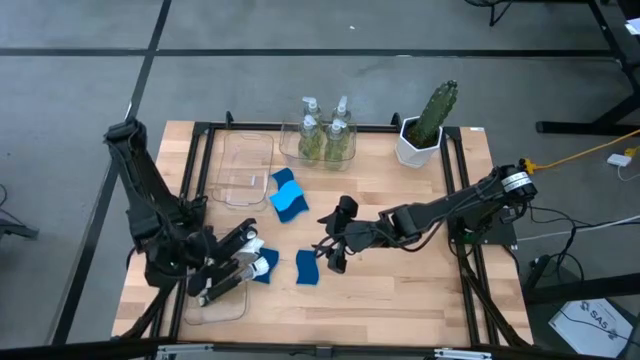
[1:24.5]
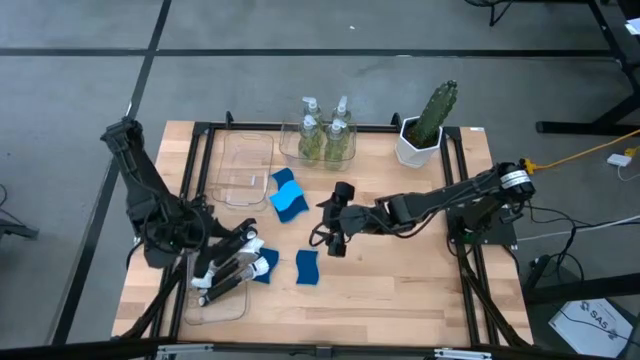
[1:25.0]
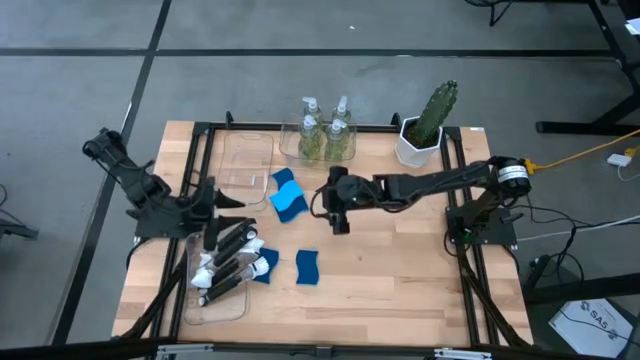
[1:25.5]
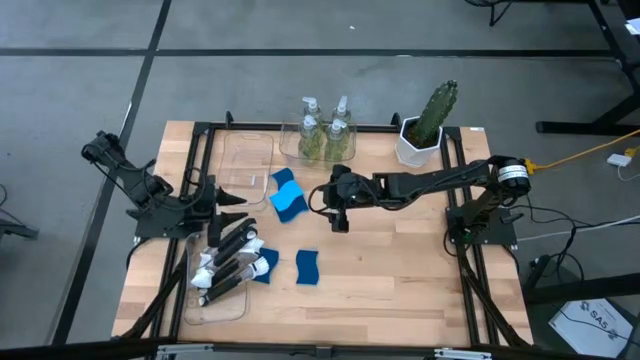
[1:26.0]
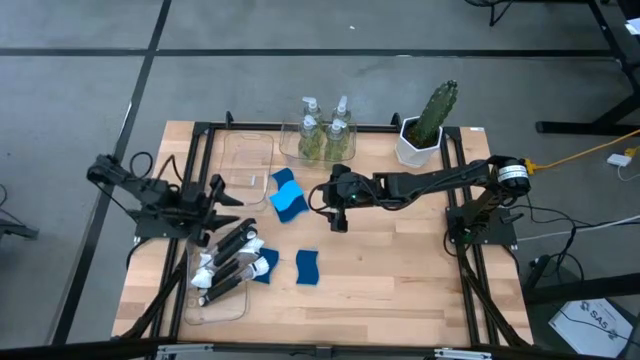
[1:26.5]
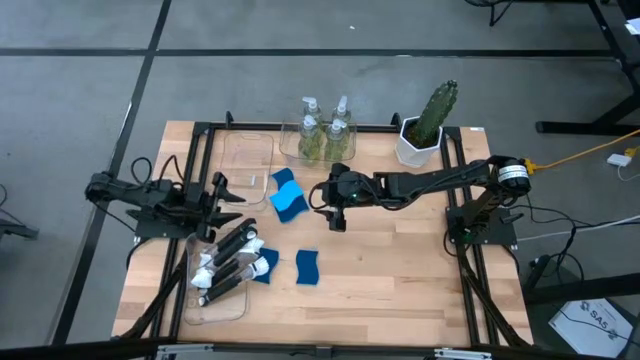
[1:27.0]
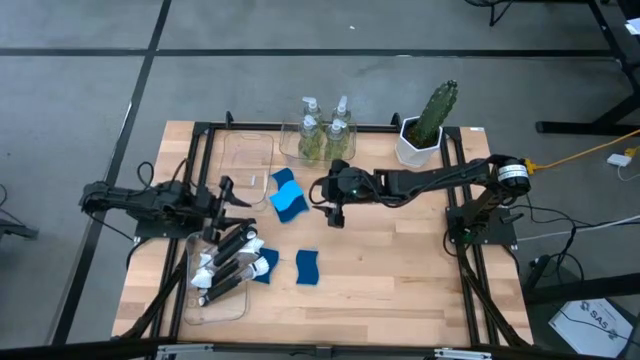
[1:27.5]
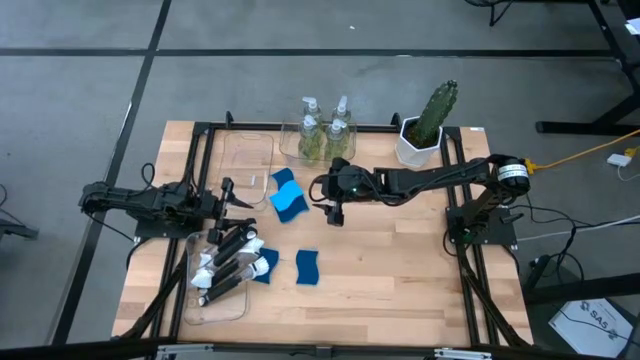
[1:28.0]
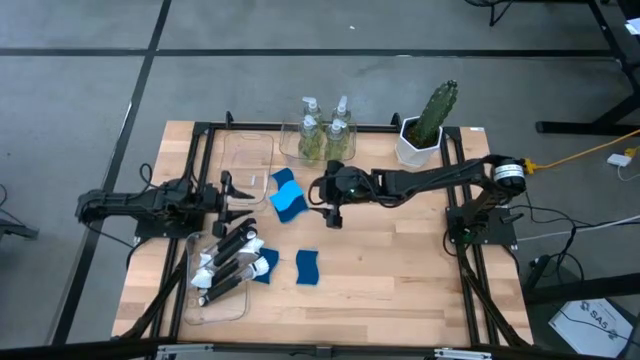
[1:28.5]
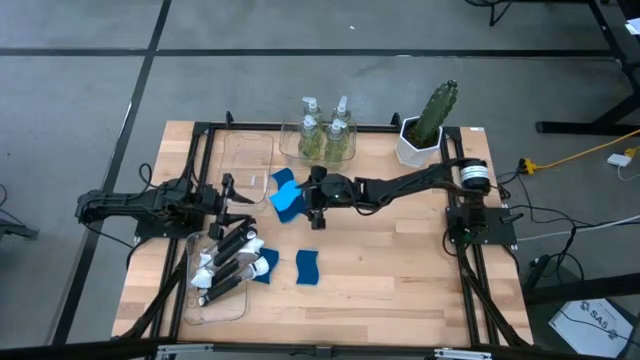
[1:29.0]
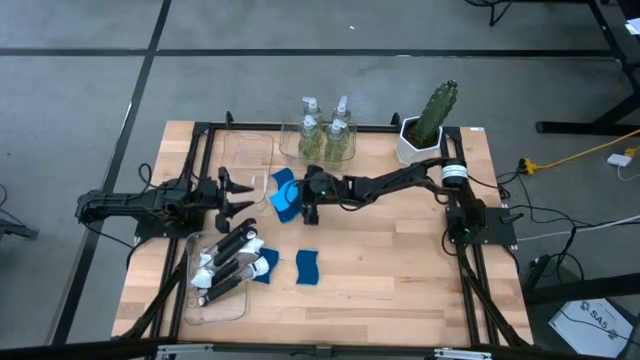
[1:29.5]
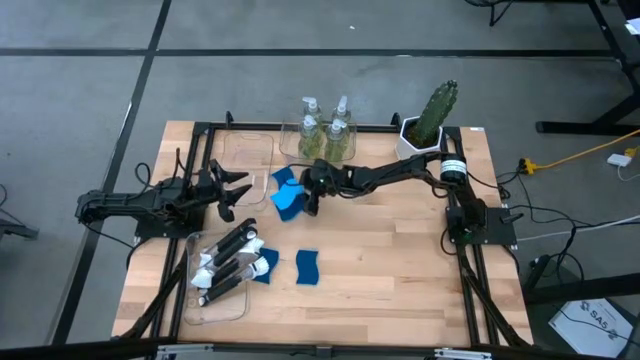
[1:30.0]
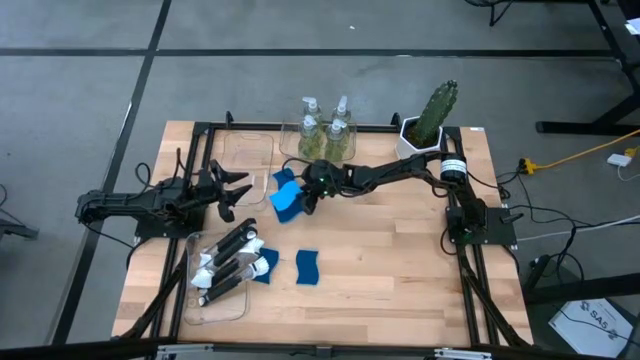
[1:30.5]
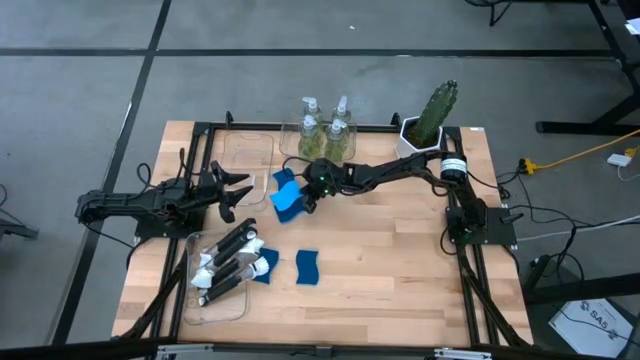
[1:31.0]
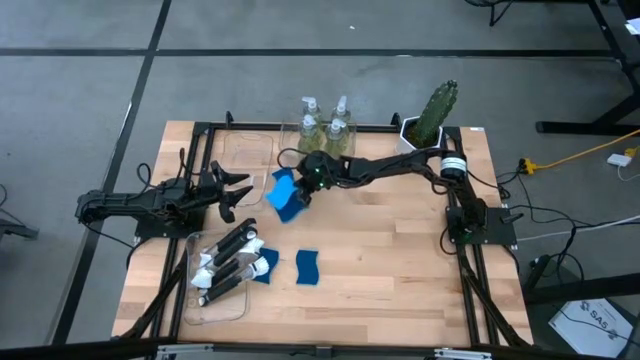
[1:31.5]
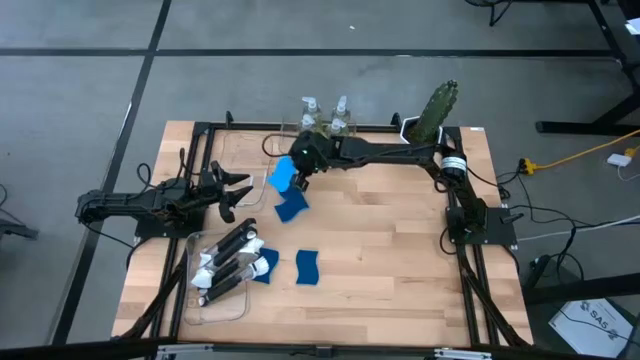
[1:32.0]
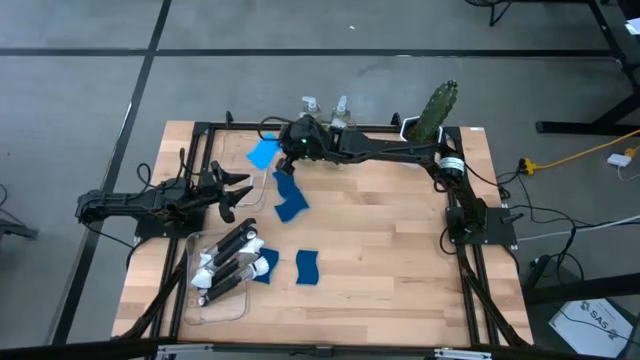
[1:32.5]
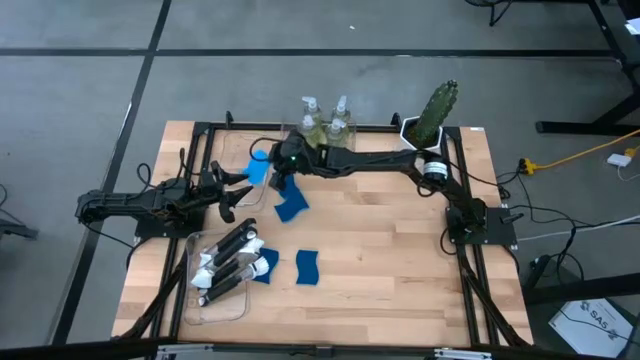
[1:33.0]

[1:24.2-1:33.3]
Task: Pick & Place Kitchen Sink Supplies
Put the blue sponge into the top left transparent bin

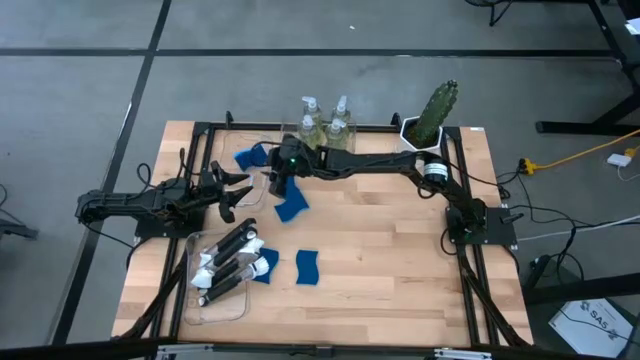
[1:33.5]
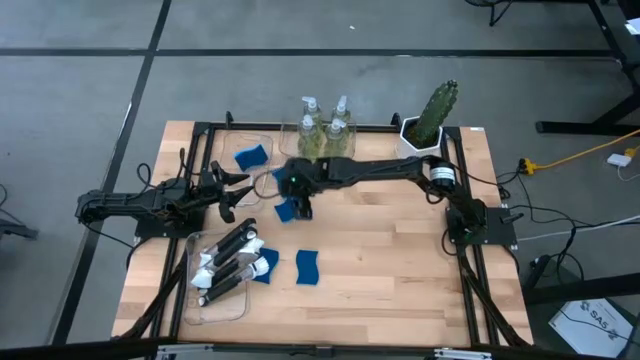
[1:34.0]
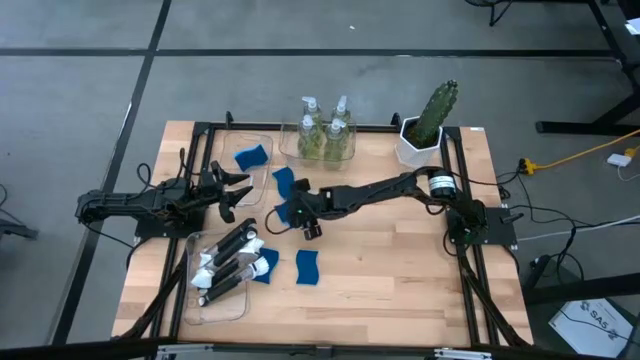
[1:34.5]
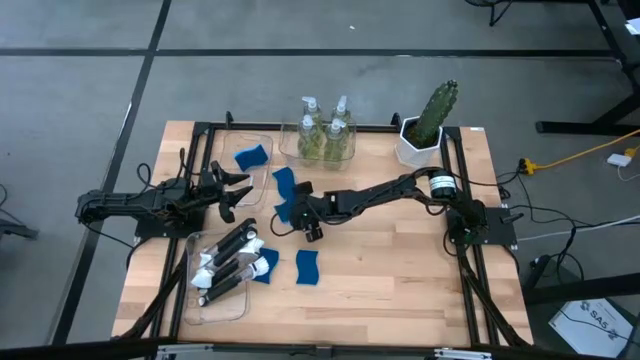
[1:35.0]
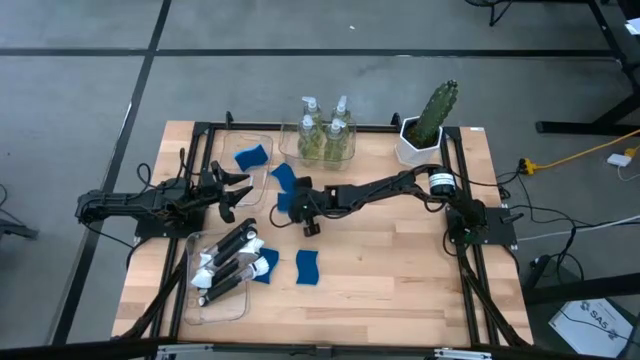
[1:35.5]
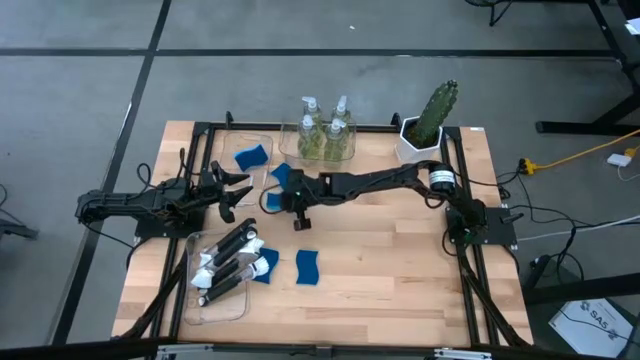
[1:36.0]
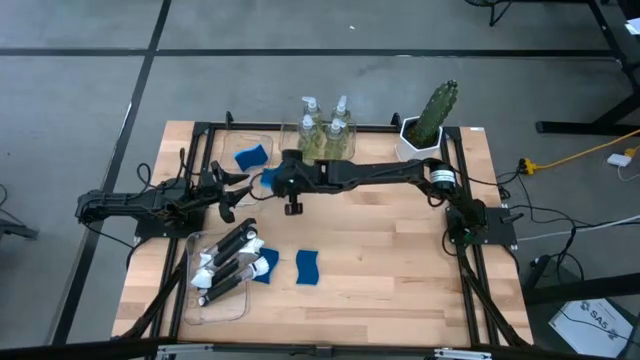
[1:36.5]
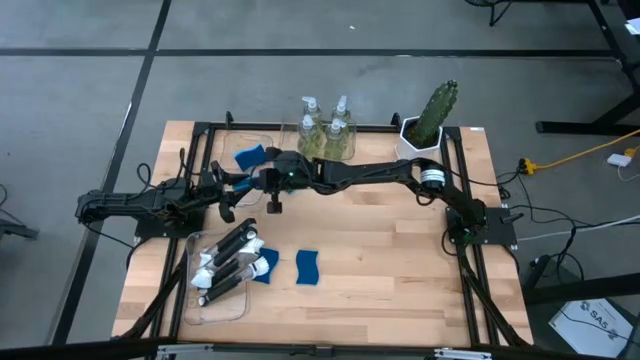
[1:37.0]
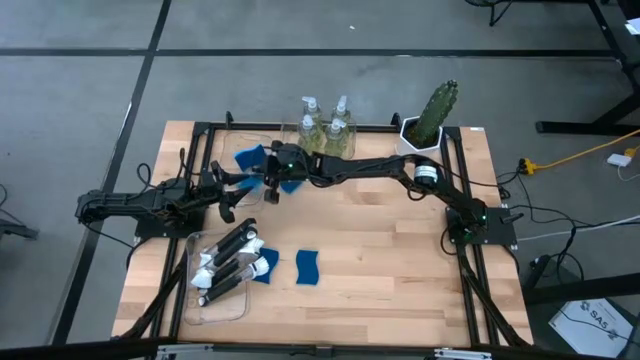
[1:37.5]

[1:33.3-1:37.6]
Put the blue sponge into the top left transparent bin

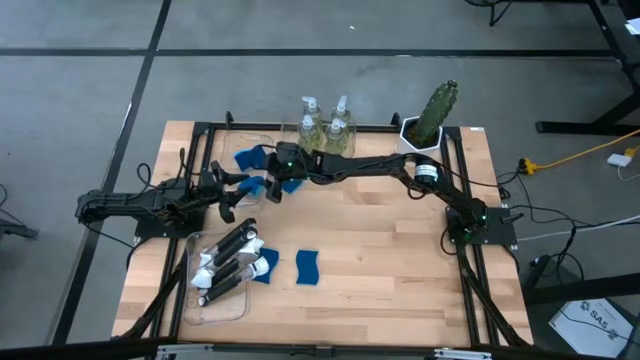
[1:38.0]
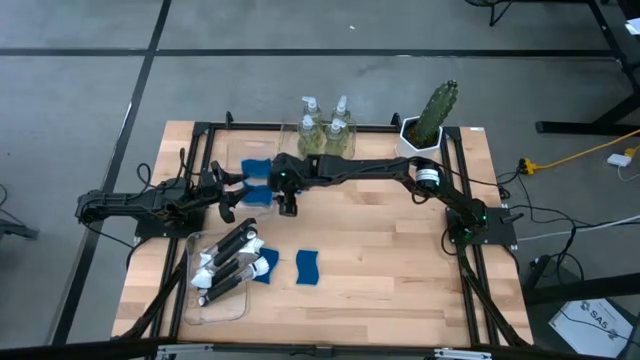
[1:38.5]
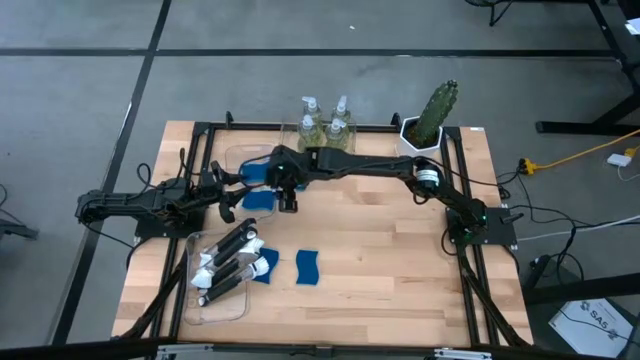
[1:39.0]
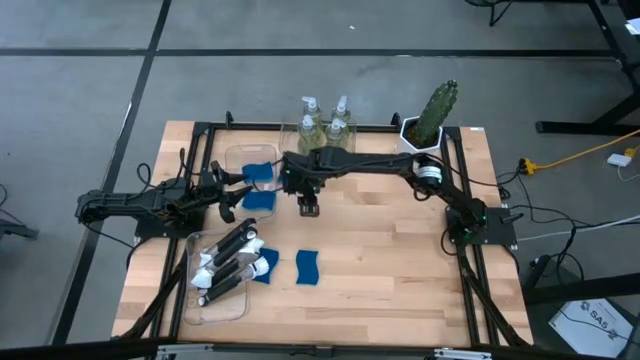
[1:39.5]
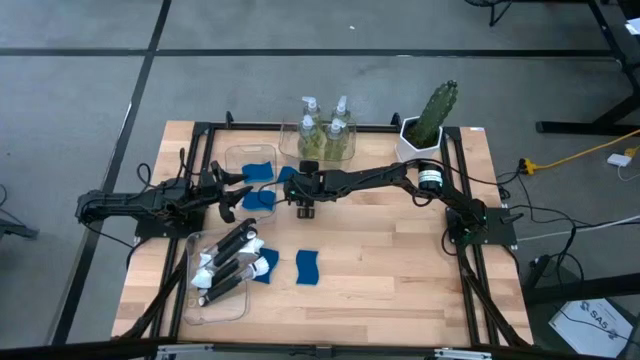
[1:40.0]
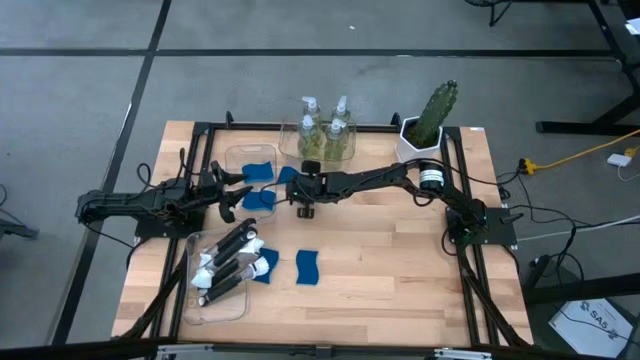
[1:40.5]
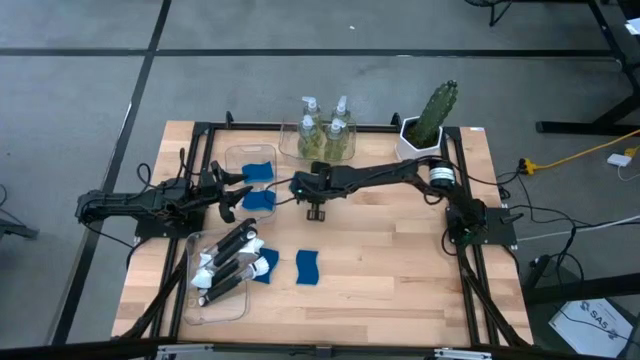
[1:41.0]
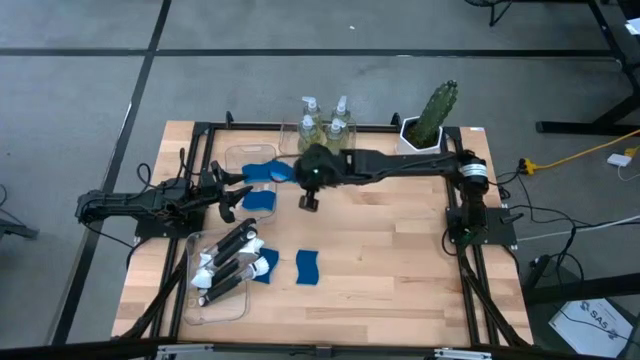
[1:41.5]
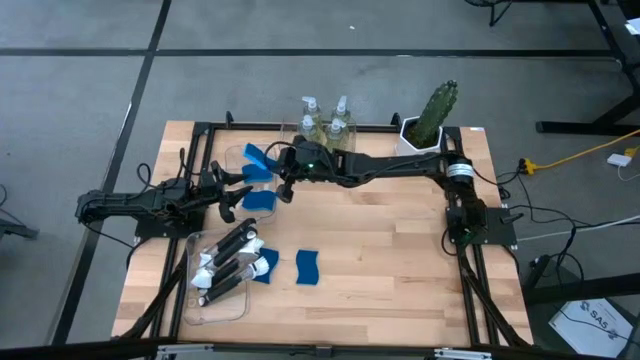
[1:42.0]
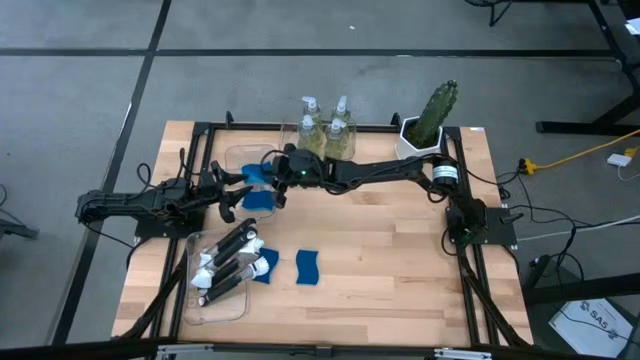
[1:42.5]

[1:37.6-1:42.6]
Put the blue sponge into the top left transparent bin

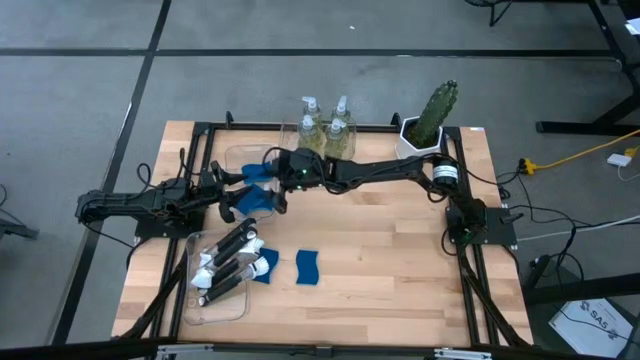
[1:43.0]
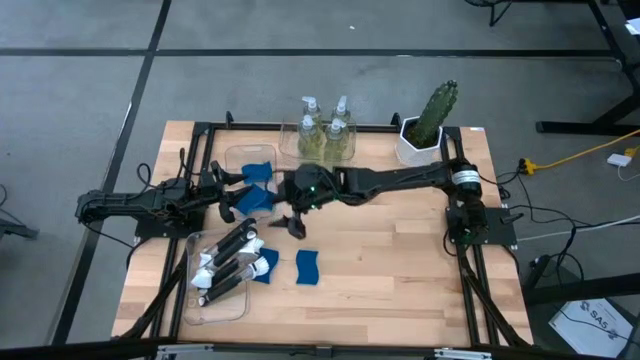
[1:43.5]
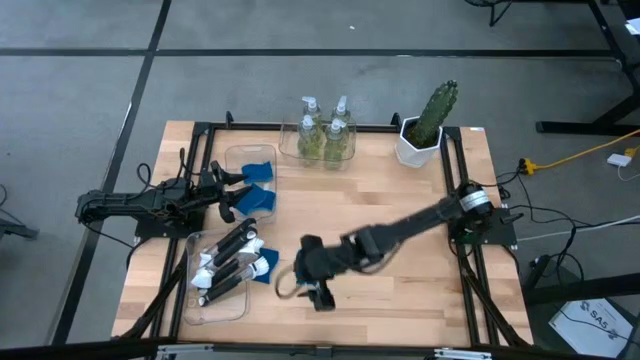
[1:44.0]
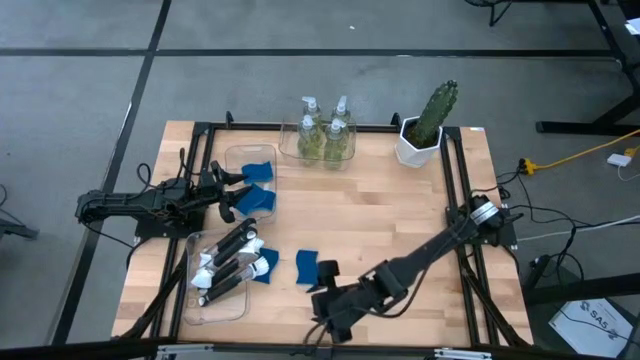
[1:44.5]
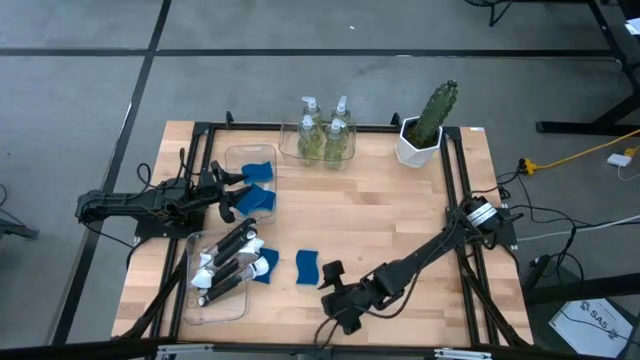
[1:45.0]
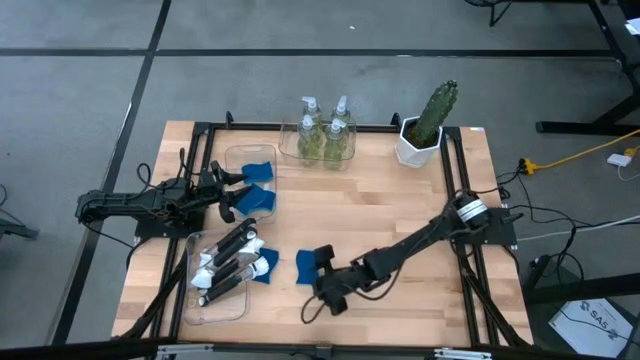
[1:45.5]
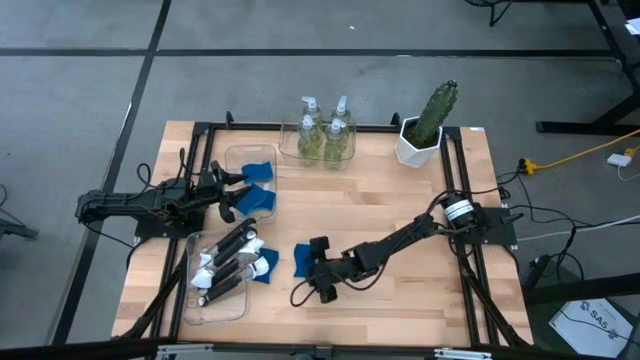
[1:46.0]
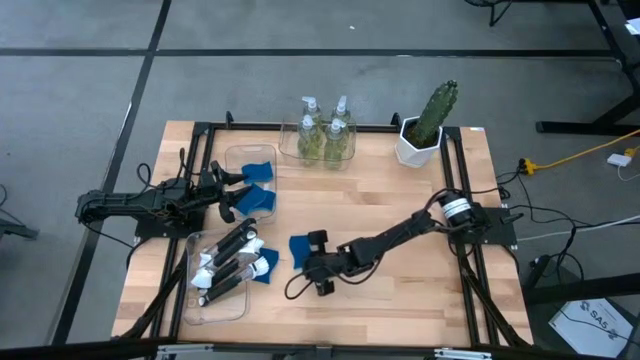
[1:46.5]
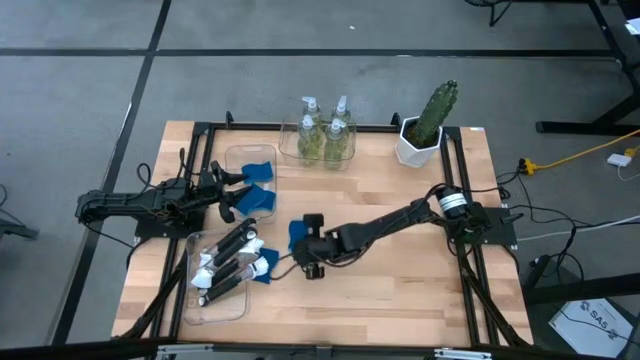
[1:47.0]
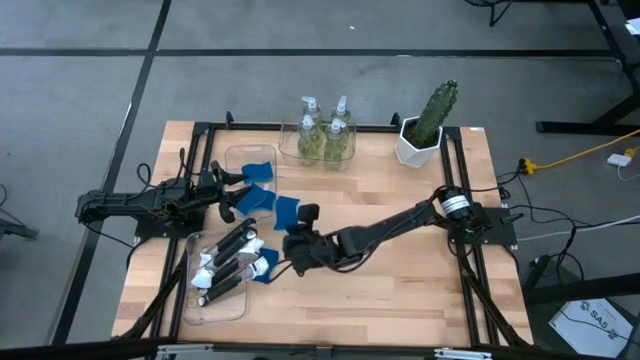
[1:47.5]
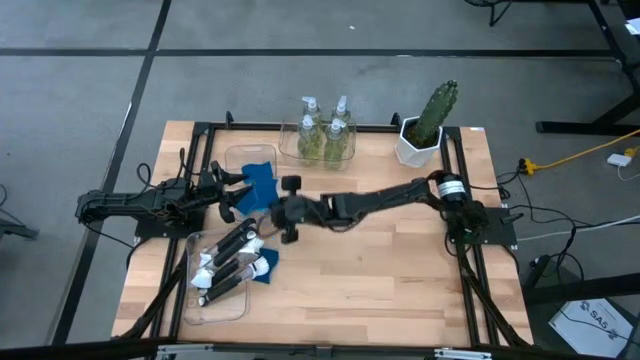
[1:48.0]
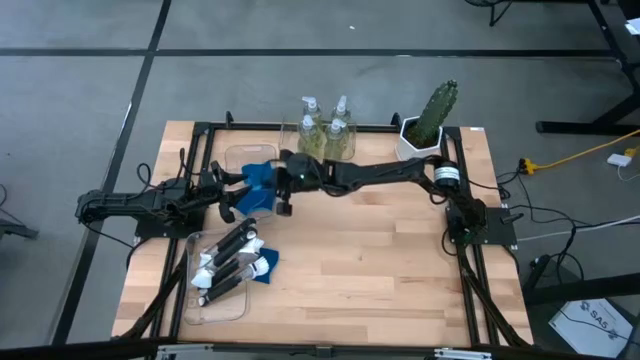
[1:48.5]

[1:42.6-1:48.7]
Put the blue sponge into the top left transparent bin
